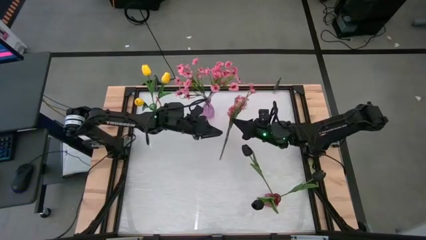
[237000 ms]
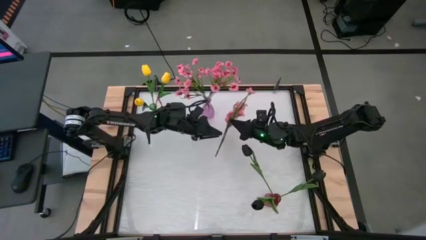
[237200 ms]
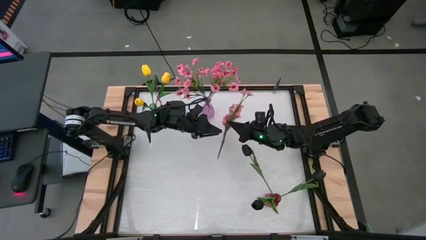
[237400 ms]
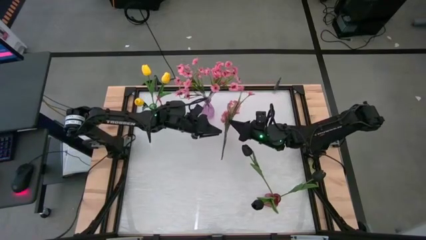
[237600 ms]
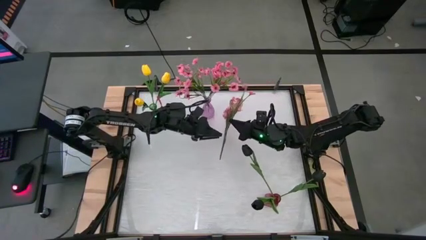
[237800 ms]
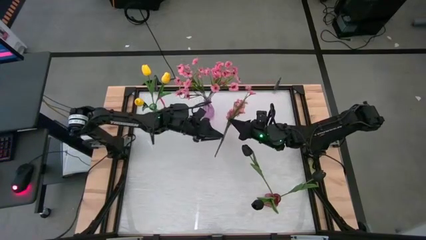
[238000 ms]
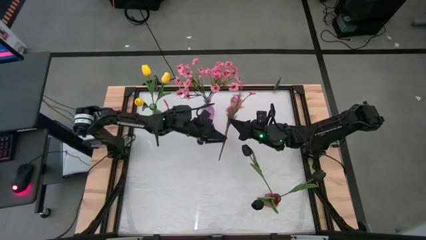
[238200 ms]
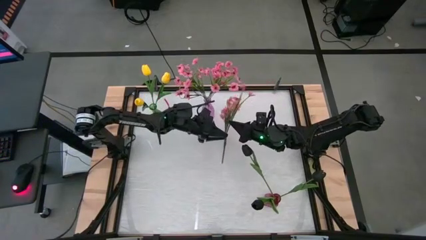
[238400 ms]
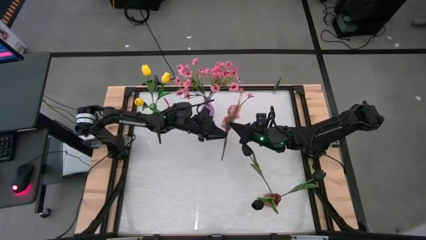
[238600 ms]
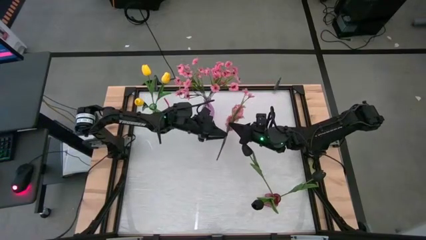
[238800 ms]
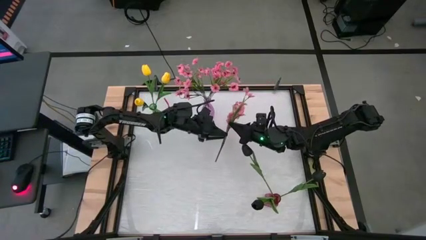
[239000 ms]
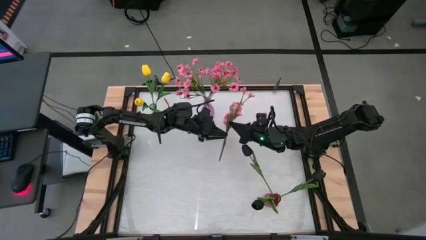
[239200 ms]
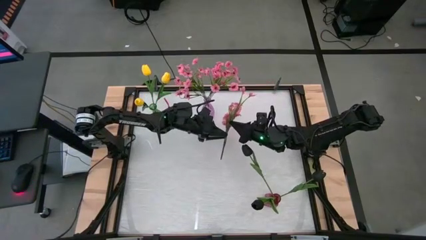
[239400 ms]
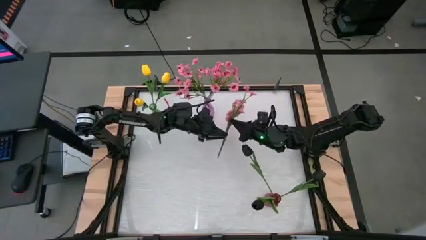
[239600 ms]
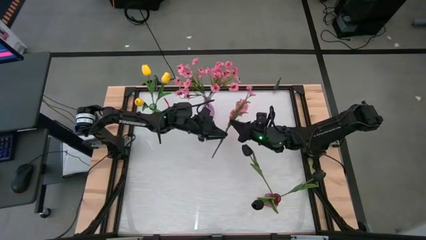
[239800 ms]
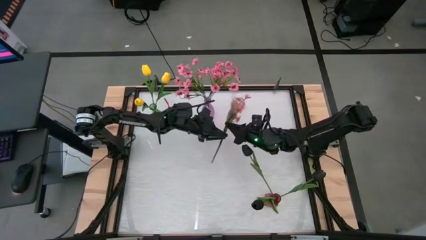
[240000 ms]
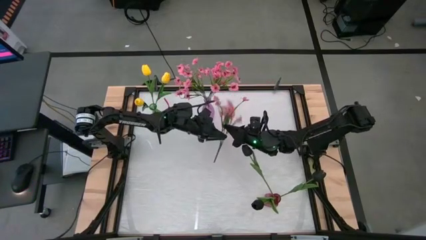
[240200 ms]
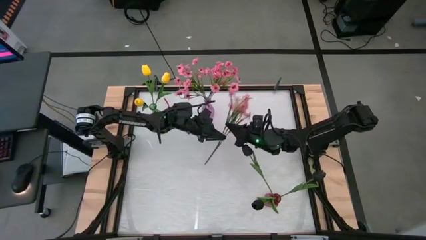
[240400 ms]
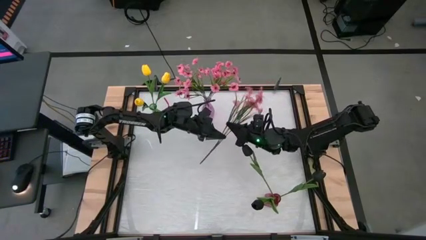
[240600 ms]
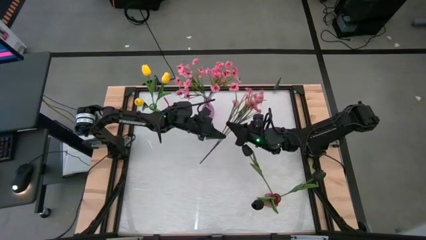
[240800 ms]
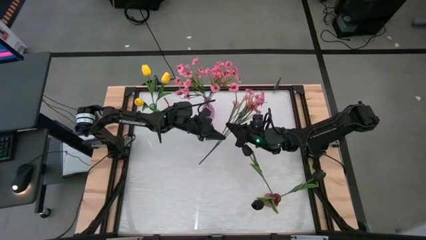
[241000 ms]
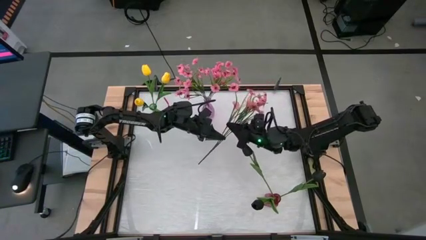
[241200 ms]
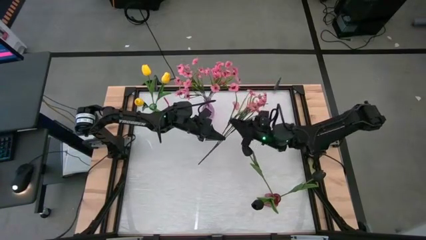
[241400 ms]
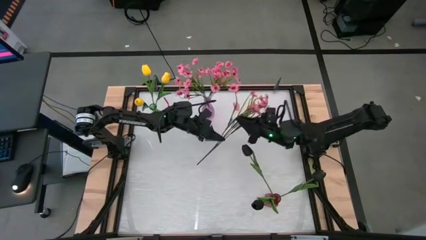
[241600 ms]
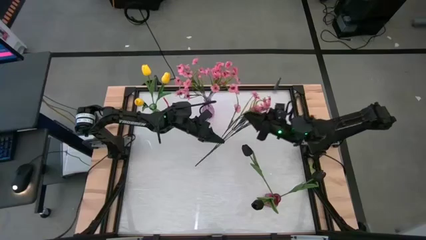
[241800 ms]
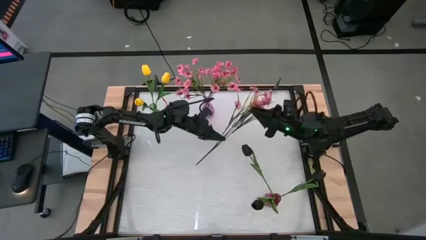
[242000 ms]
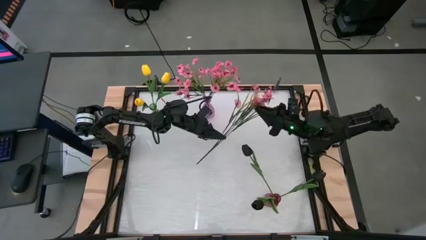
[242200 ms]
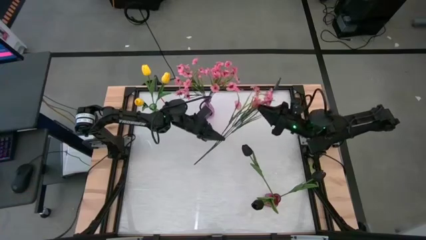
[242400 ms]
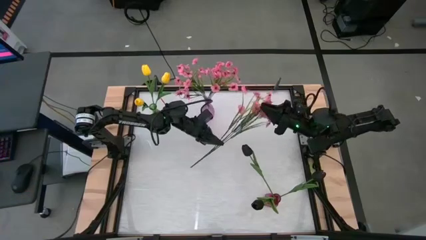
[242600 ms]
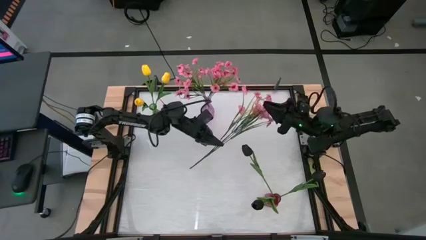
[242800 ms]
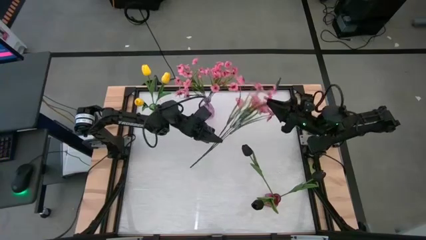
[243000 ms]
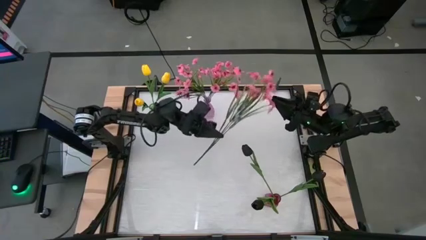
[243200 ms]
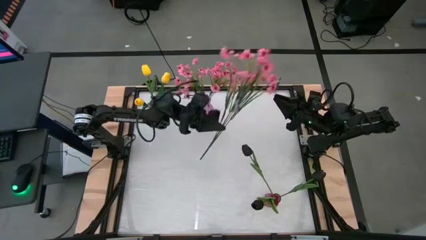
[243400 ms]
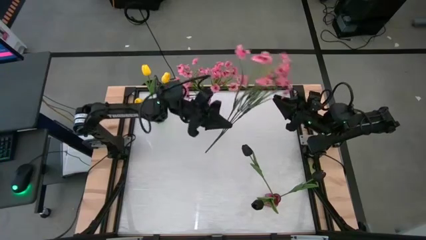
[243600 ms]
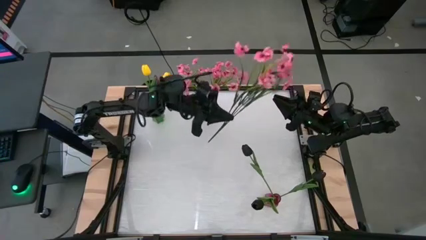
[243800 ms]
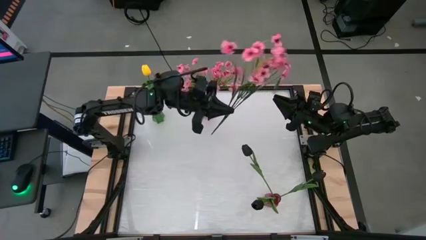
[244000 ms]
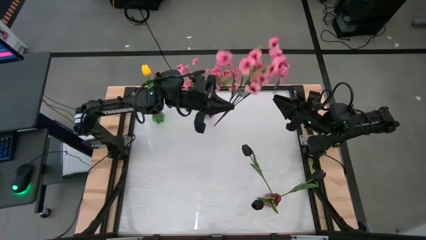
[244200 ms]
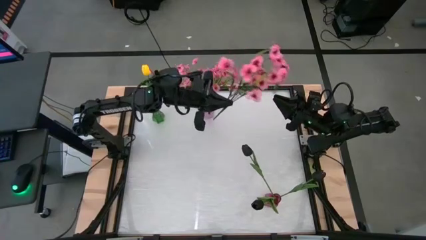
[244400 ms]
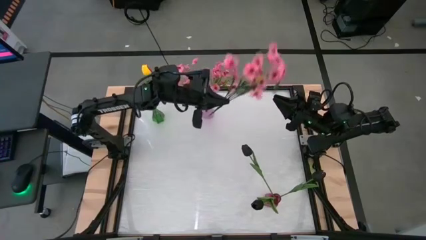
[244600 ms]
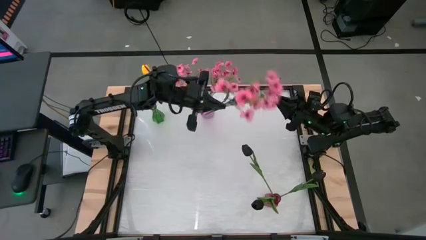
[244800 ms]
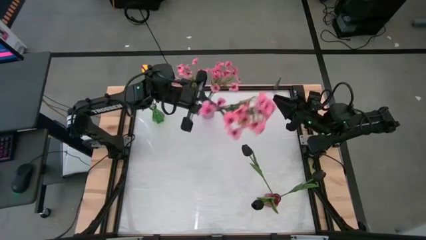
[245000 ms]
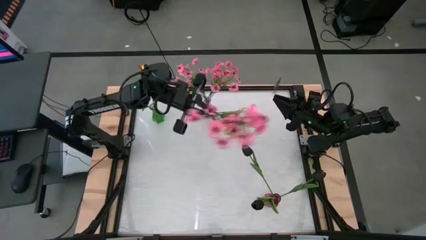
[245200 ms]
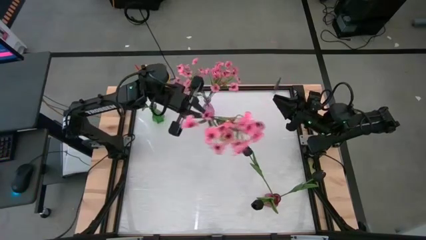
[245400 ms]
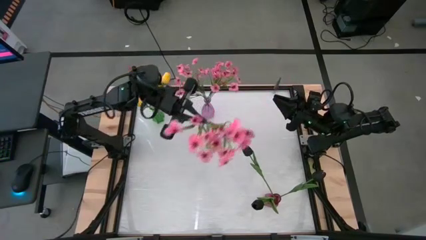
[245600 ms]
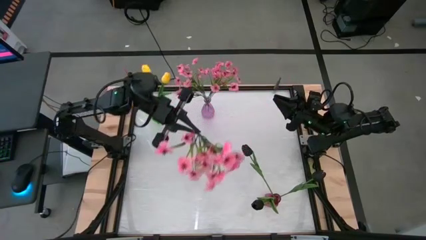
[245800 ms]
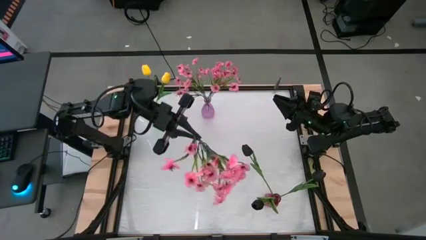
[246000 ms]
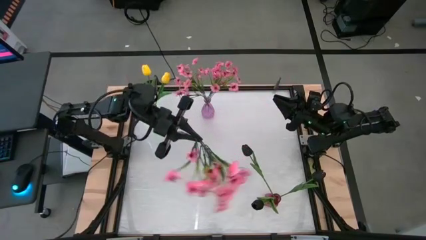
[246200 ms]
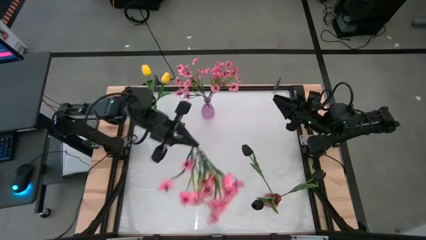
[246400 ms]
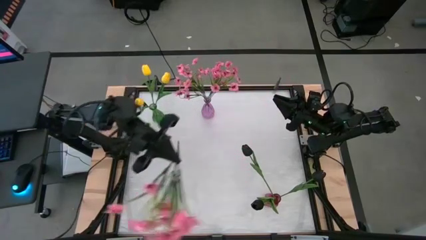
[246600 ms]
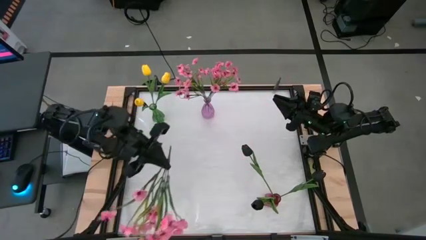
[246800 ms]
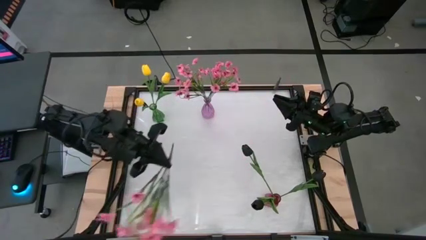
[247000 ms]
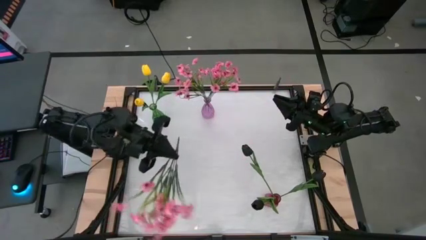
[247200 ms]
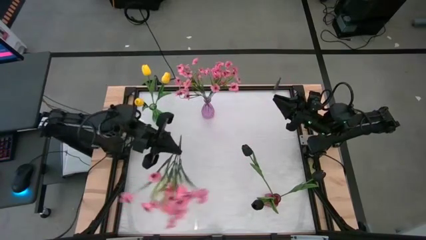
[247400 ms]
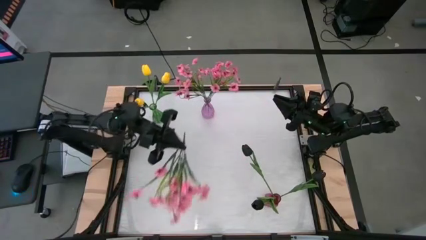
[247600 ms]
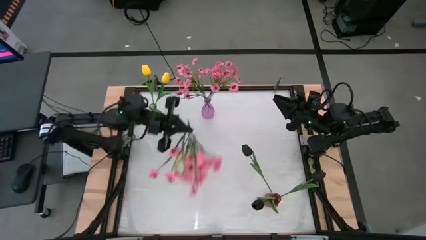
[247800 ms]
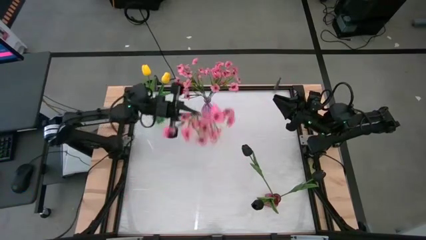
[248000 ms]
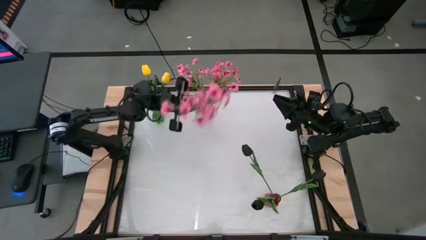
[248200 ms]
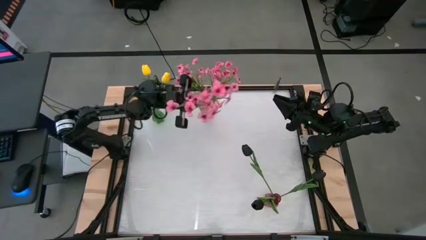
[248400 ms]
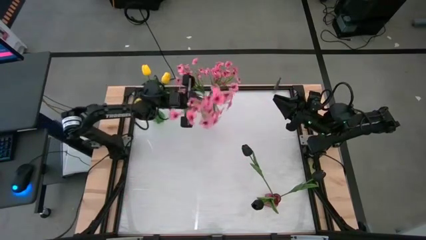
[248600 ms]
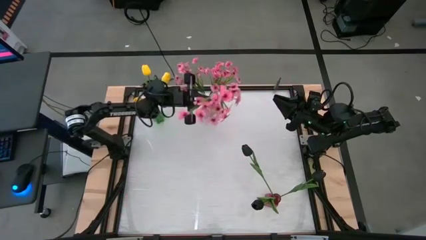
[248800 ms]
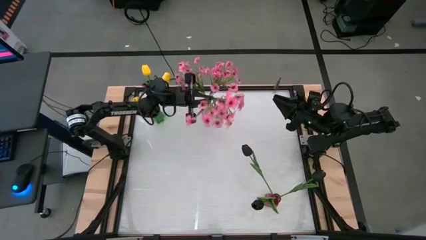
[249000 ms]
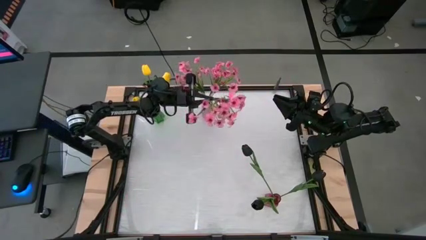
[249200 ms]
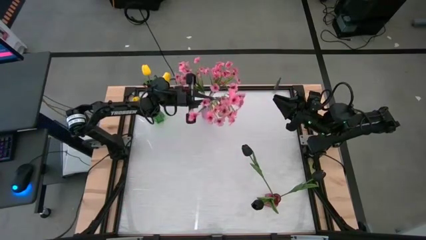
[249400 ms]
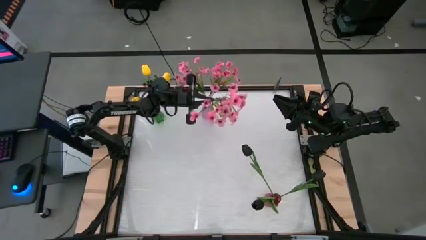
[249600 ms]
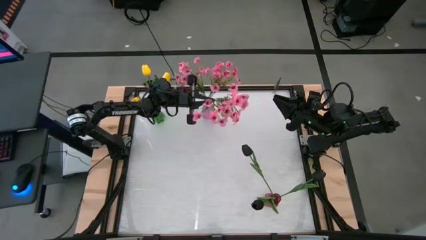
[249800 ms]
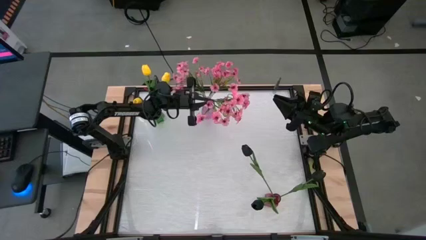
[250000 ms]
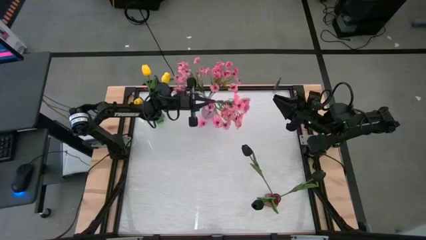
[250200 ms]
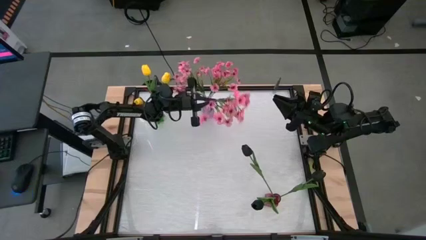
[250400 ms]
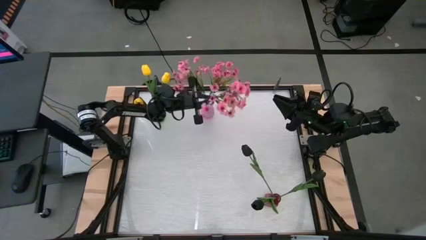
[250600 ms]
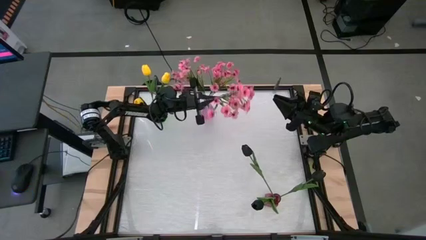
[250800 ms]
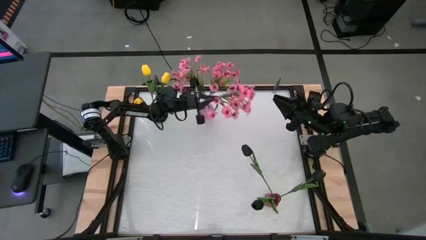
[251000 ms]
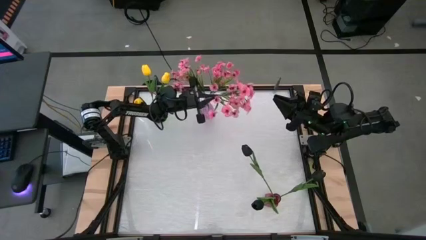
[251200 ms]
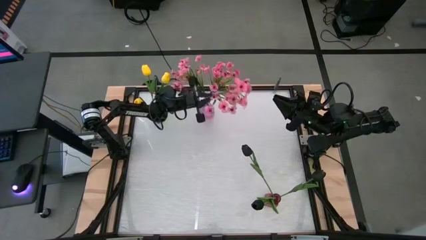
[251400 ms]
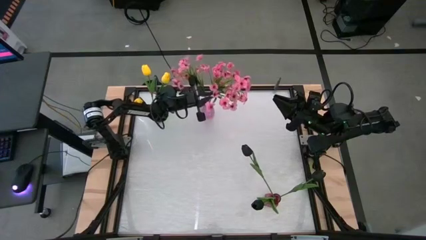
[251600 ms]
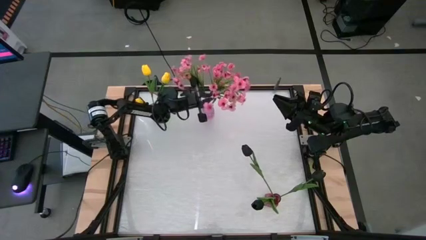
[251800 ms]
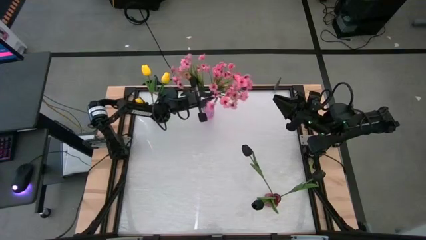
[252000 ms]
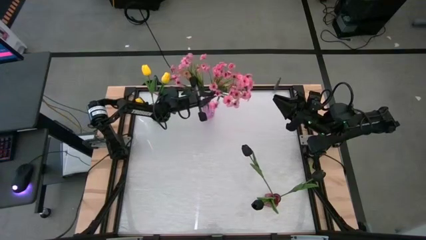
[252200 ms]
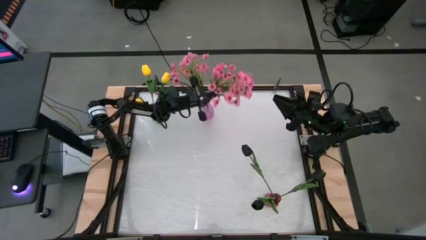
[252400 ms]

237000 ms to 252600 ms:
Task: Sort flowers into vase by color
Put the pink flowers into the purple vase

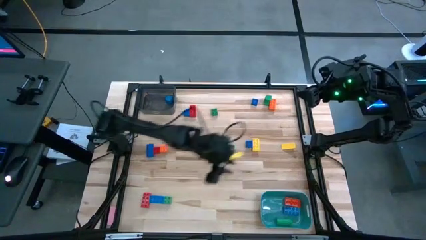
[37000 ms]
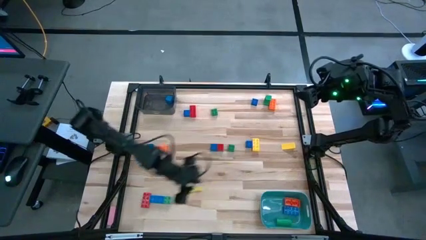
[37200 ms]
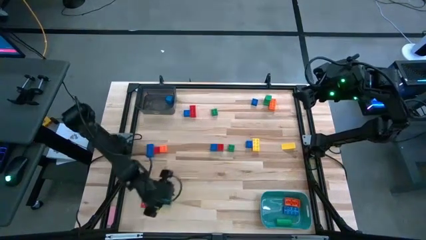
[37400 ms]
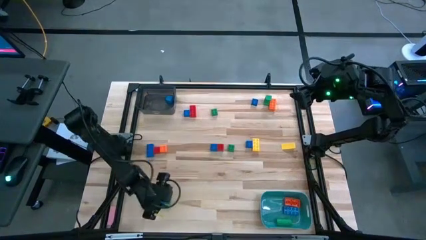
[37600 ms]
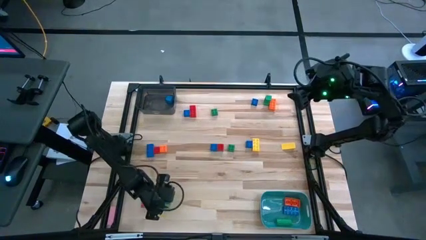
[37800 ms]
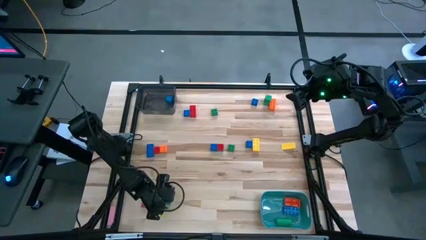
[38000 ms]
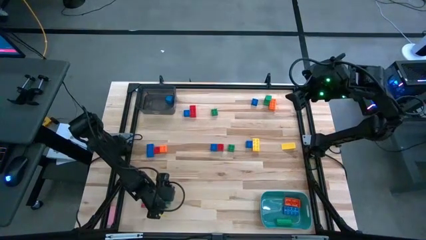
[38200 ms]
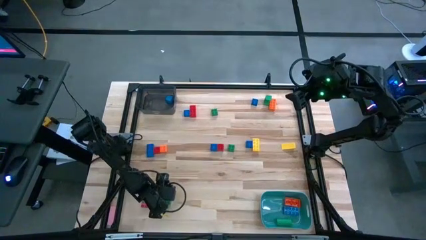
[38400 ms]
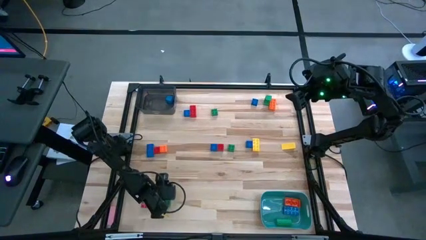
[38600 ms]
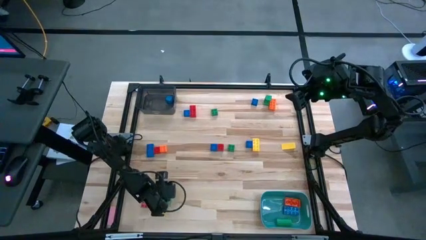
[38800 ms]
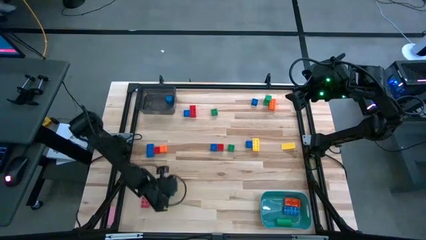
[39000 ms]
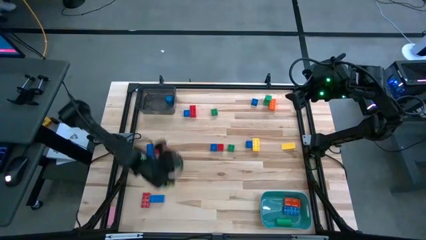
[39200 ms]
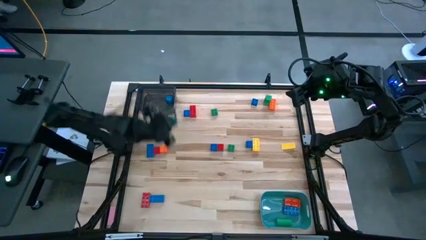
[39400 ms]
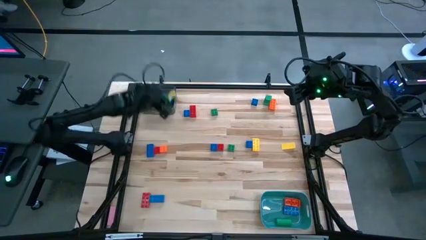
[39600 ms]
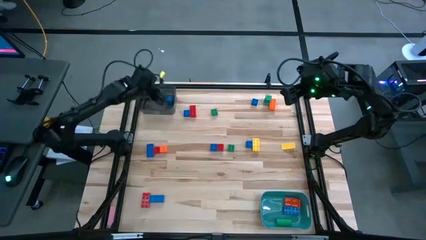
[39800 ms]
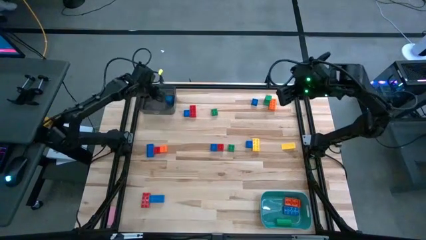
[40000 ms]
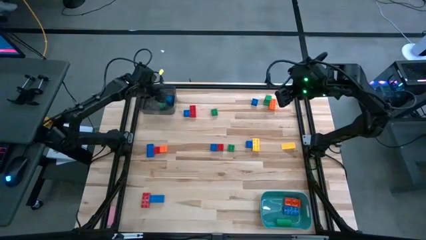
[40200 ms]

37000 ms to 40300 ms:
Task: Sort blocks by size
Put the right green game piece into the black bin
